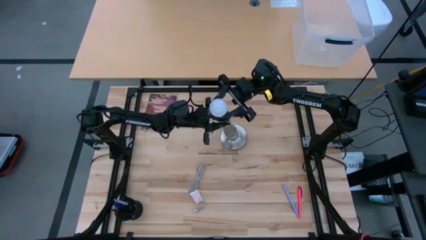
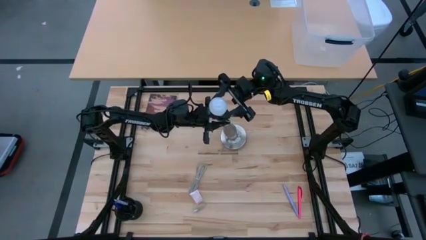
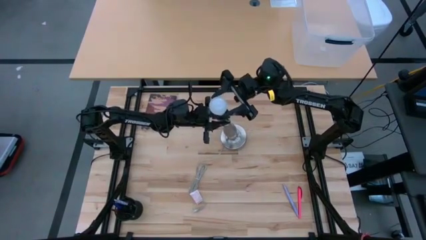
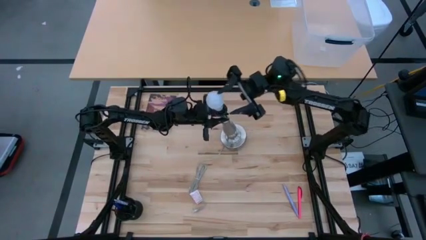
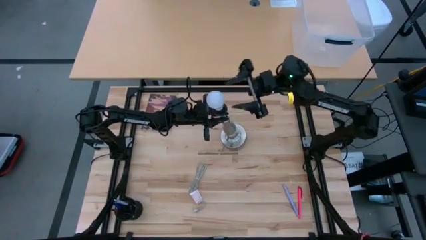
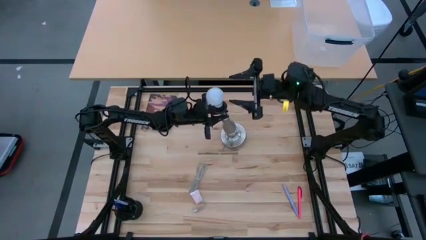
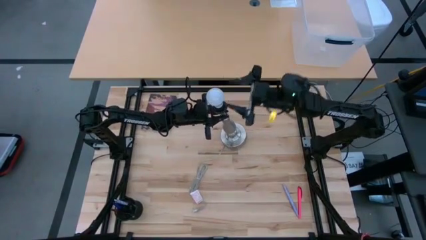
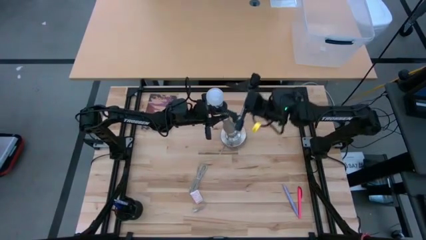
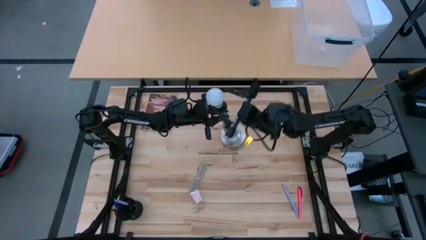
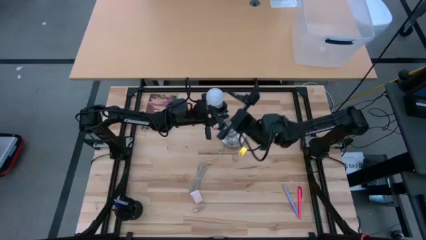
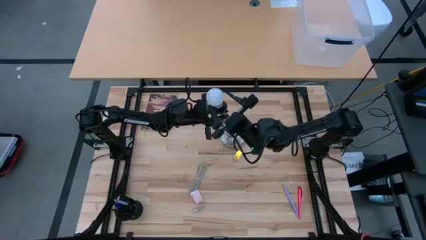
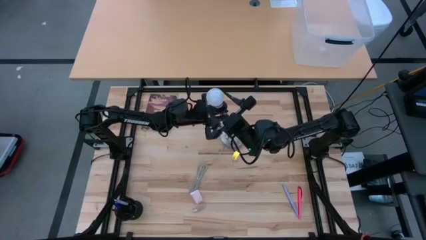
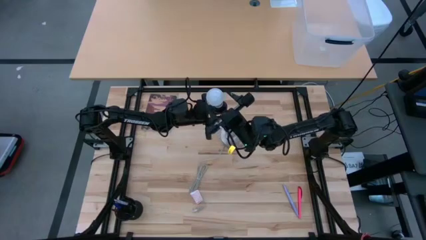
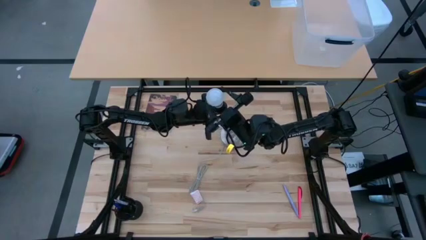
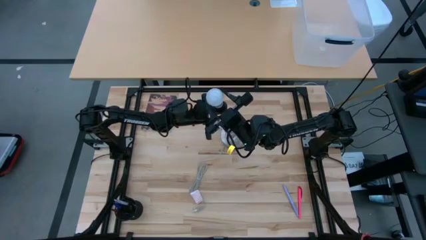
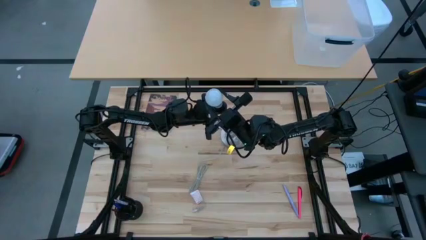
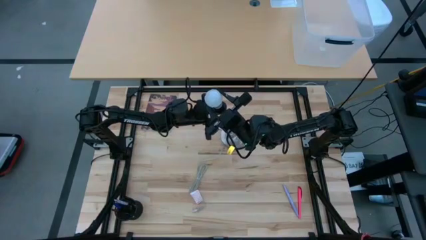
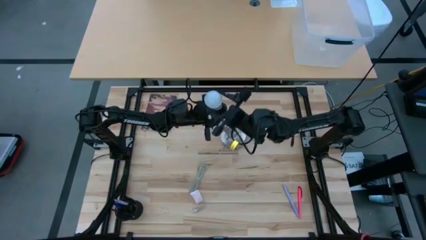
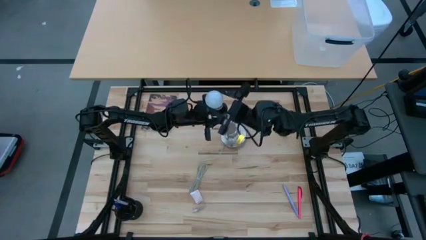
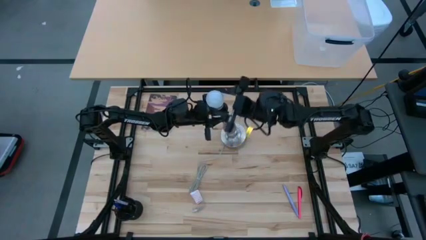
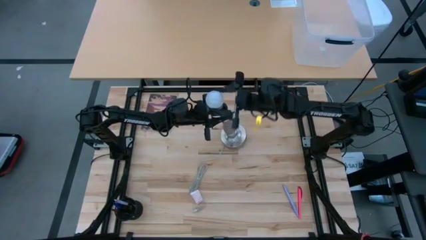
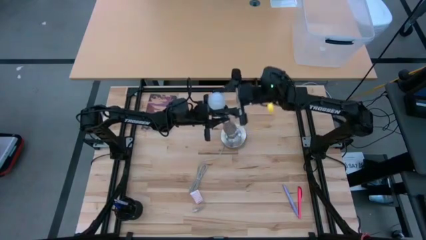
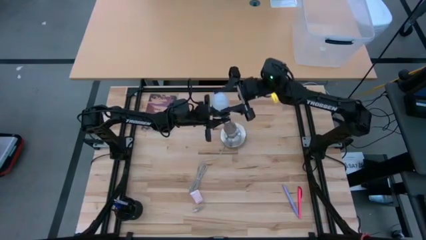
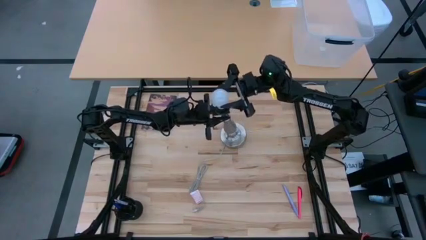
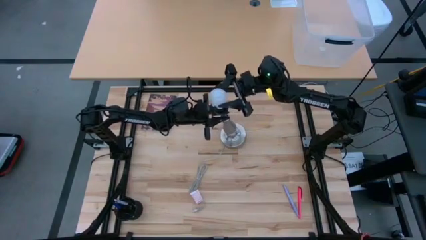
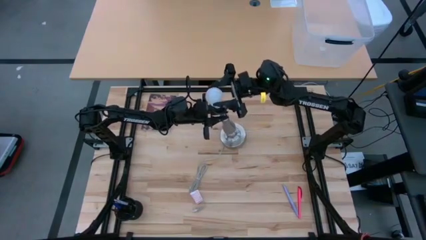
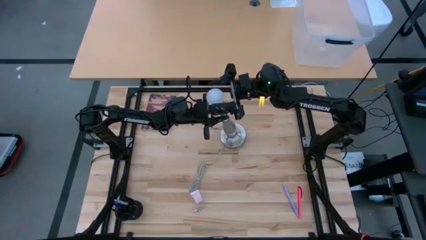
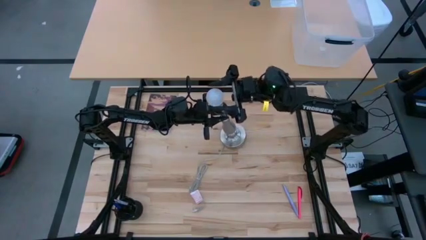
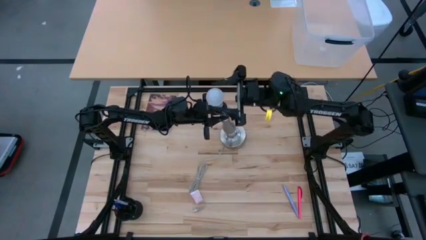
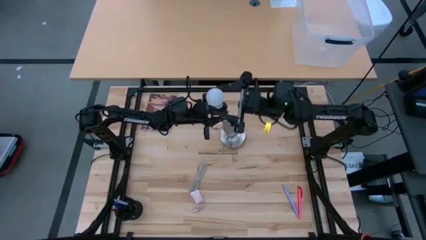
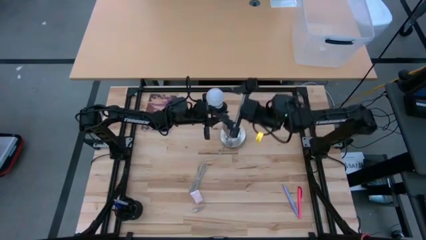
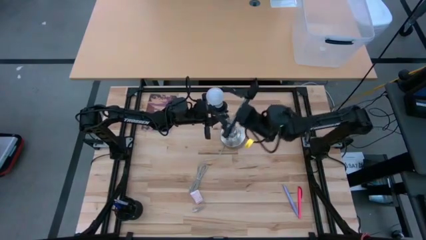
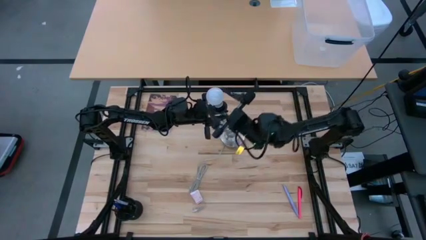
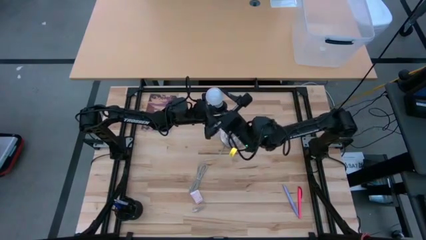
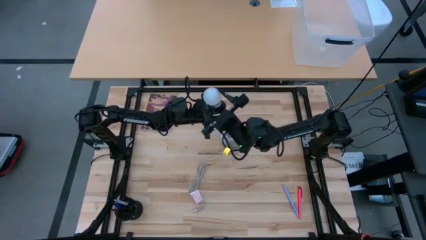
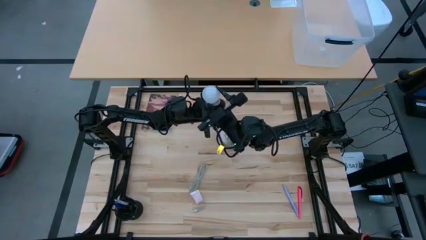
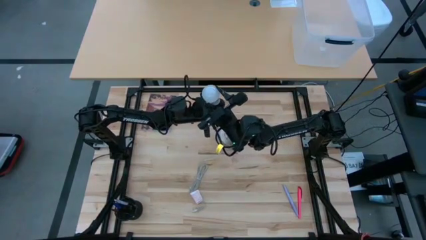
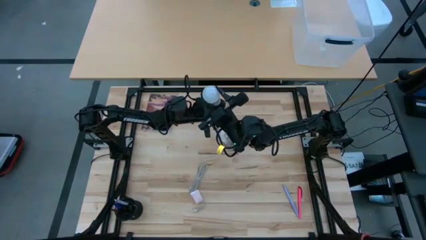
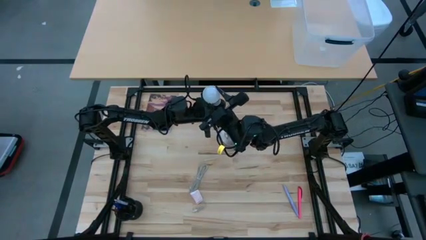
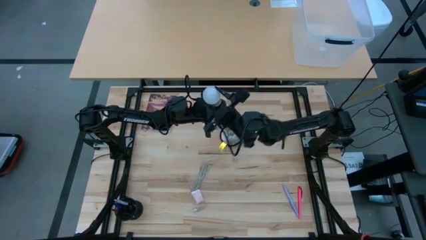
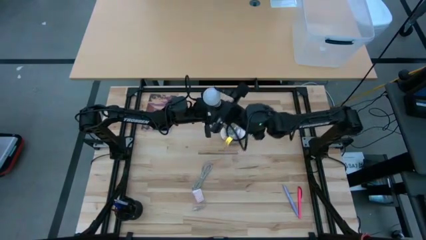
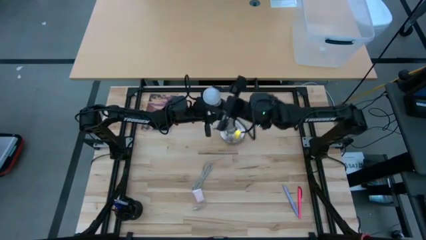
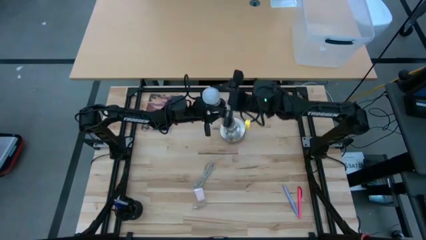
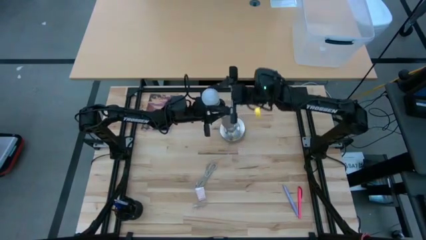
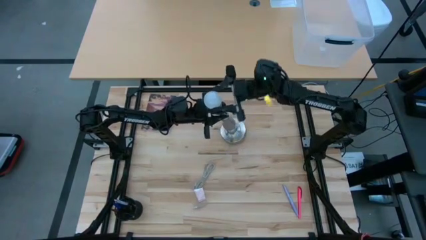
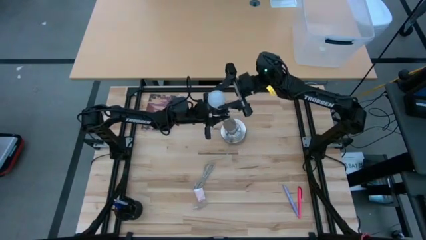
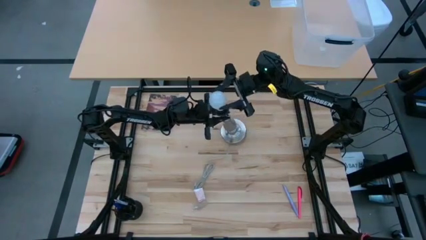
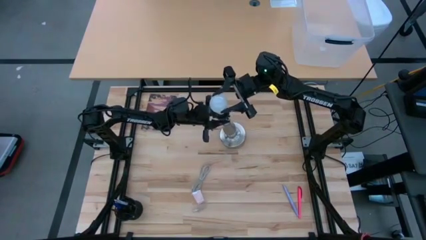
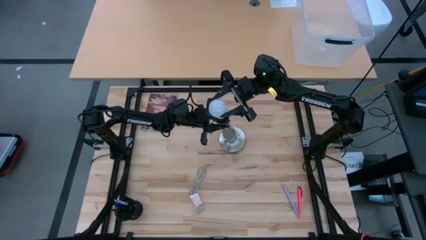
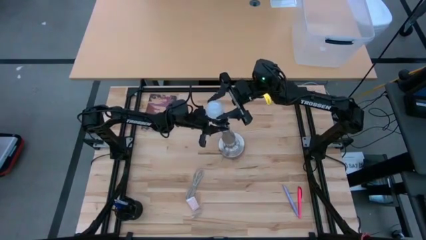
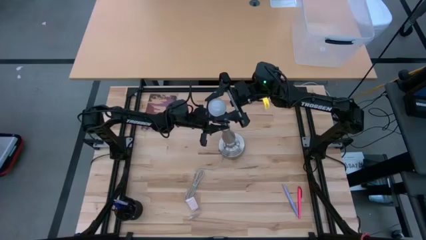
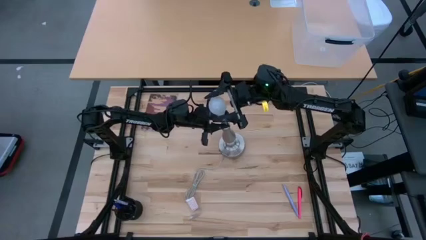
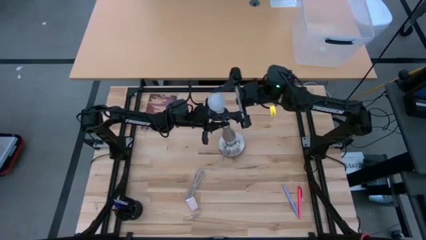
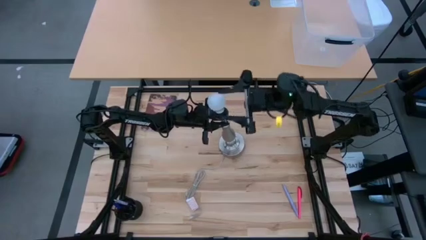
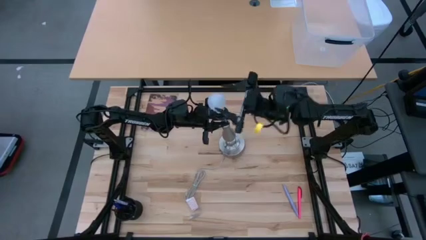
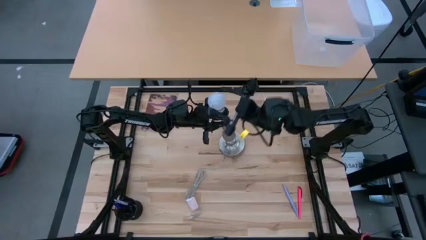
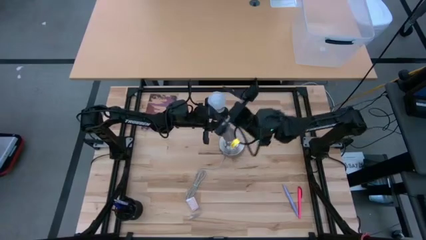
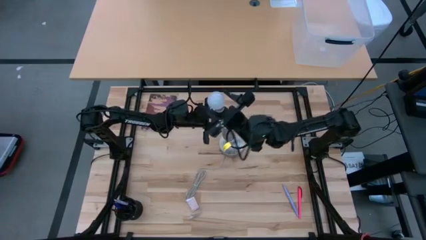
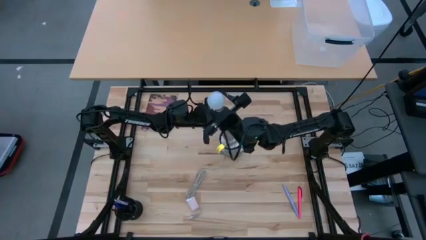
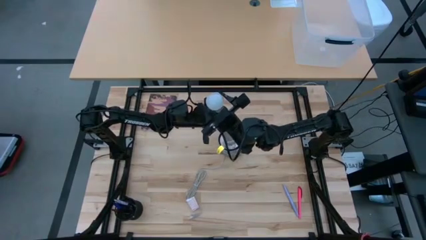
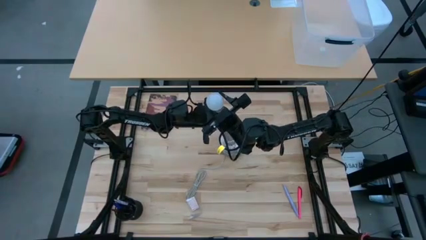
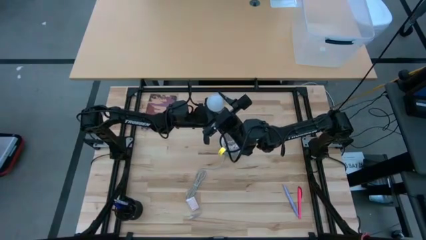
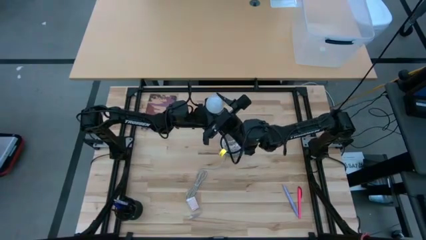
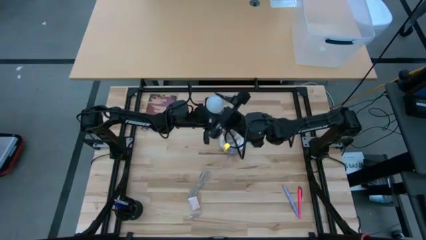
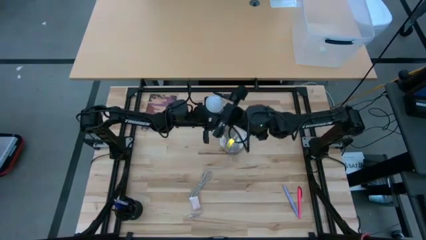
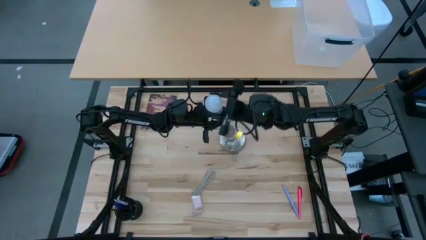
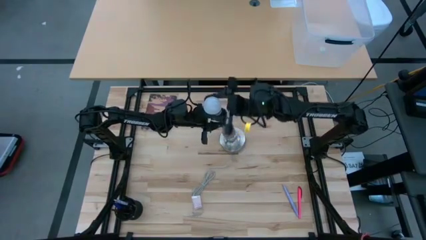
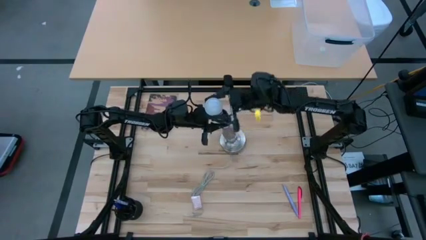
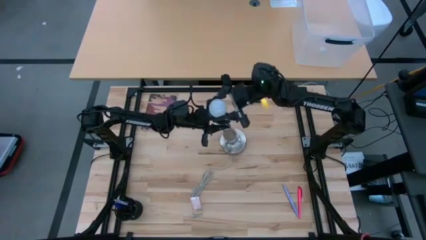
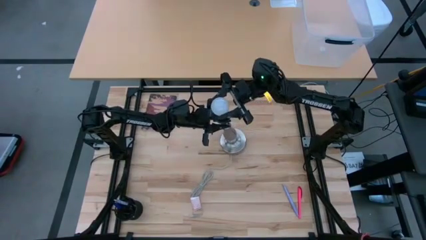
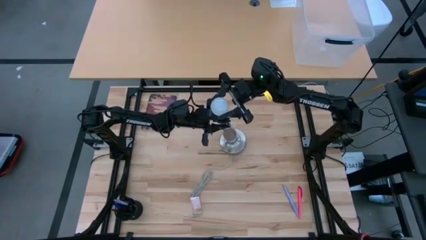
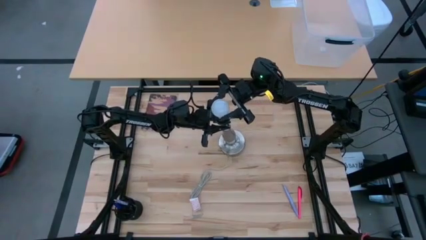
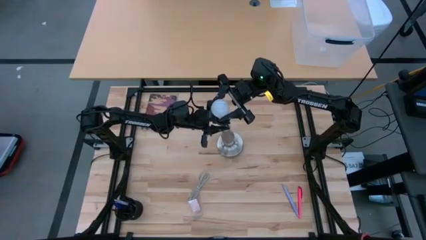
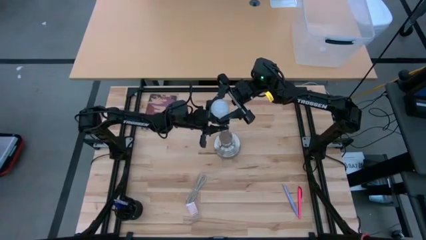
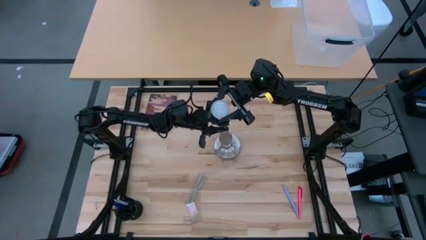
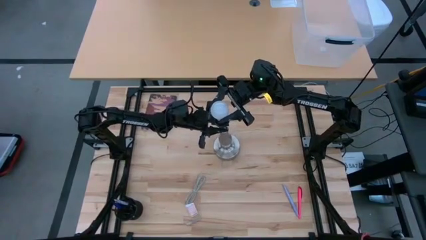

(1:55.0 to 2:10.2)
Task: Screw lightbulb
Remove the lightbulb from the silver lamp and put it on the table
